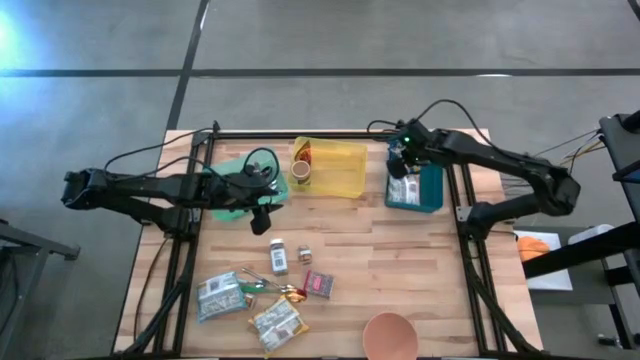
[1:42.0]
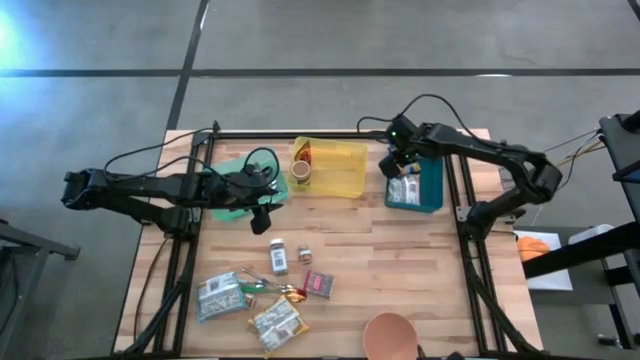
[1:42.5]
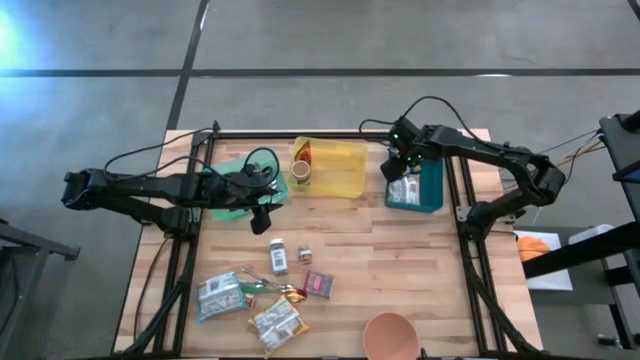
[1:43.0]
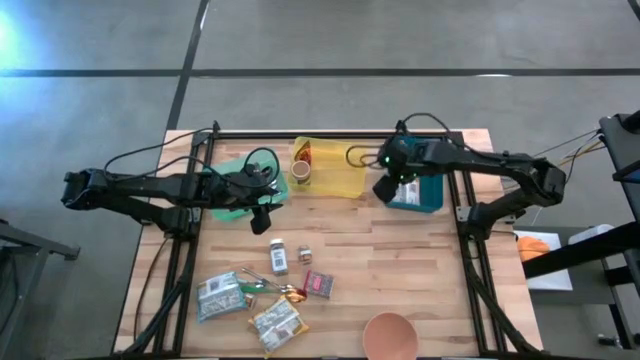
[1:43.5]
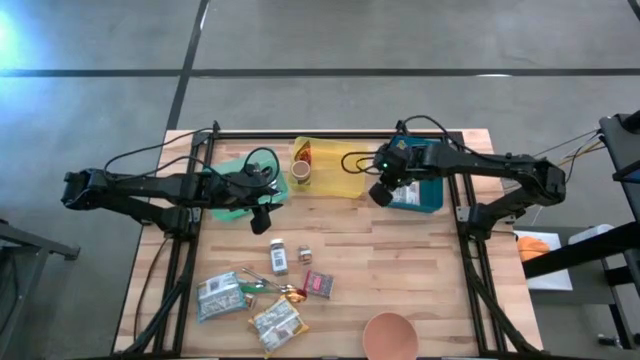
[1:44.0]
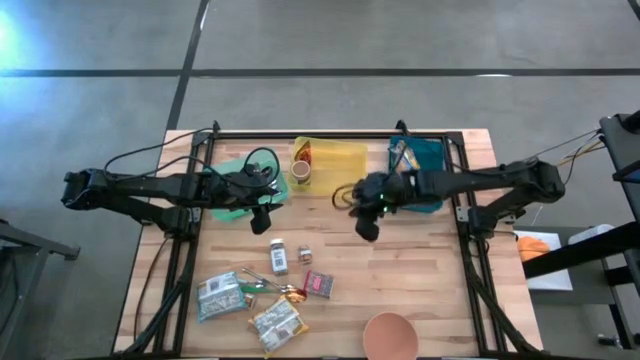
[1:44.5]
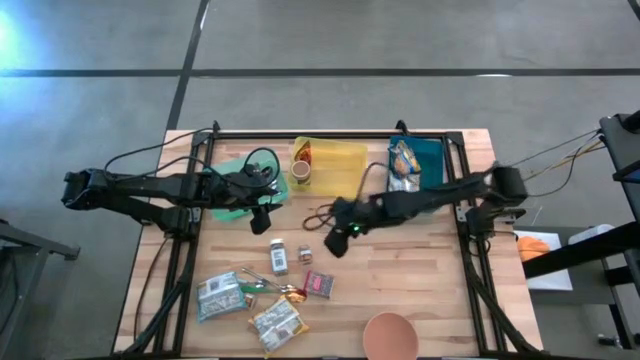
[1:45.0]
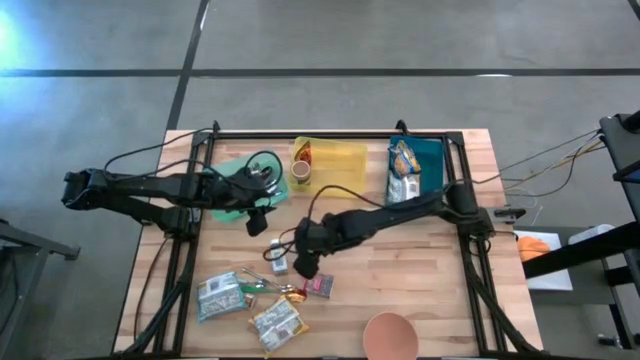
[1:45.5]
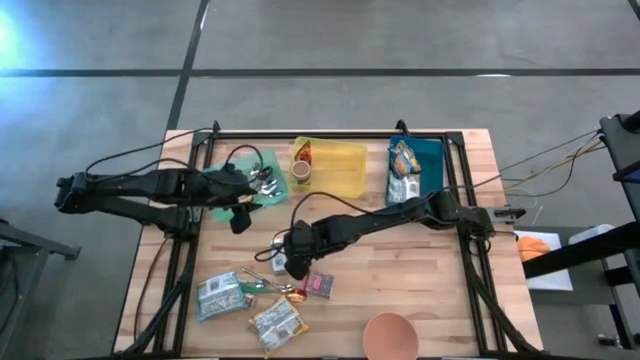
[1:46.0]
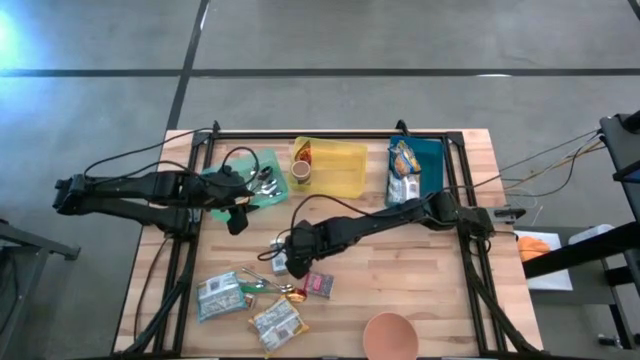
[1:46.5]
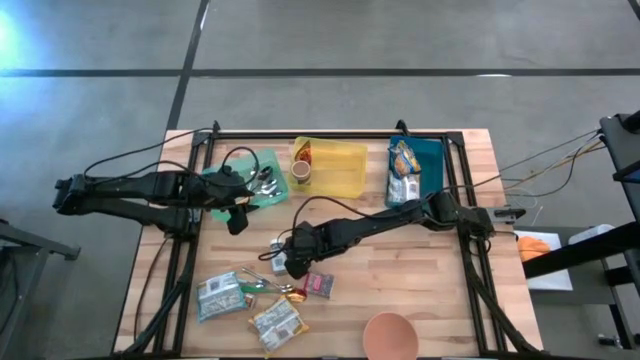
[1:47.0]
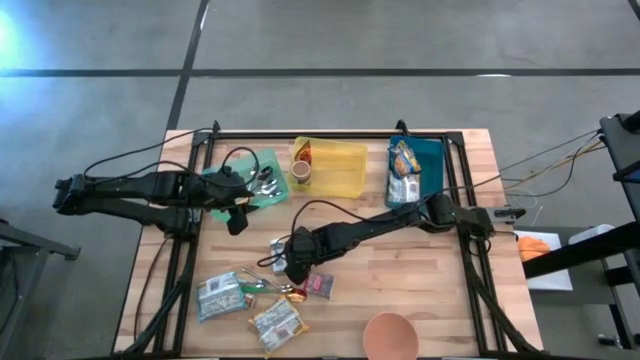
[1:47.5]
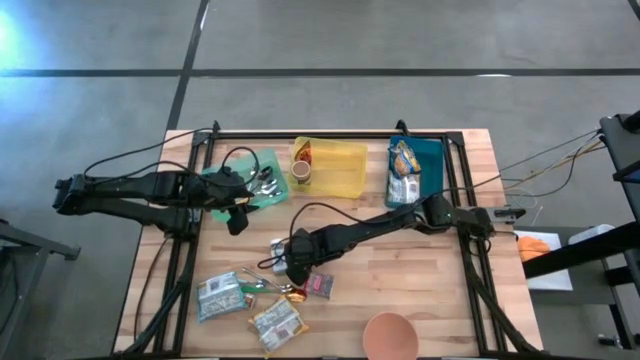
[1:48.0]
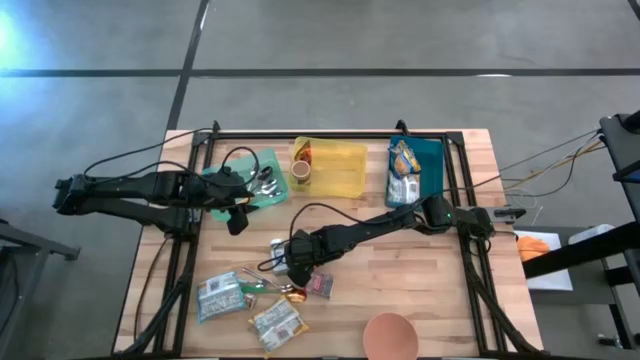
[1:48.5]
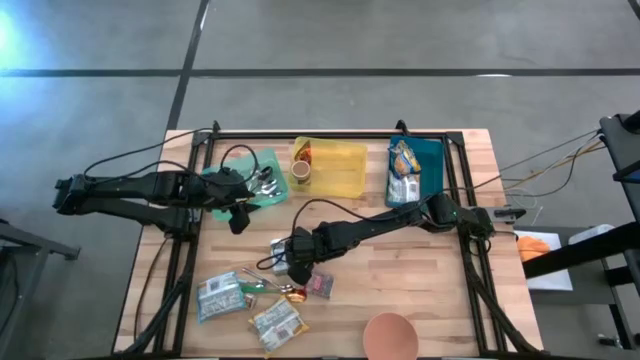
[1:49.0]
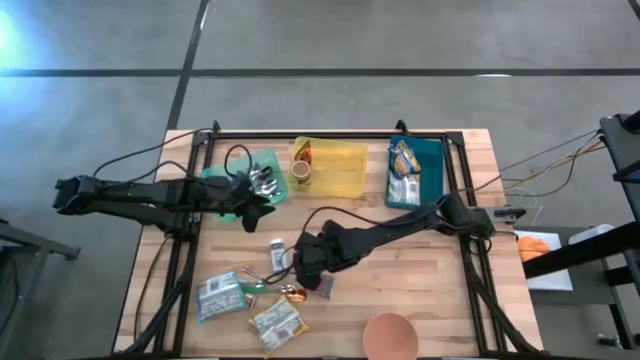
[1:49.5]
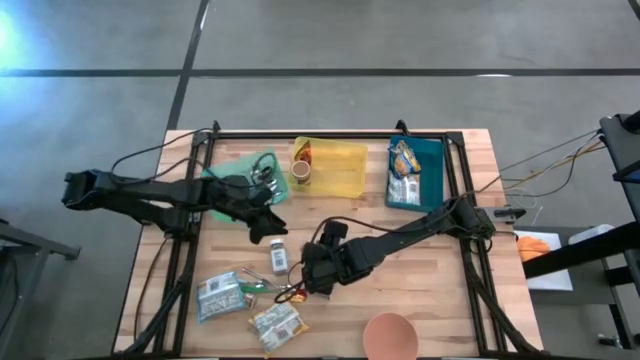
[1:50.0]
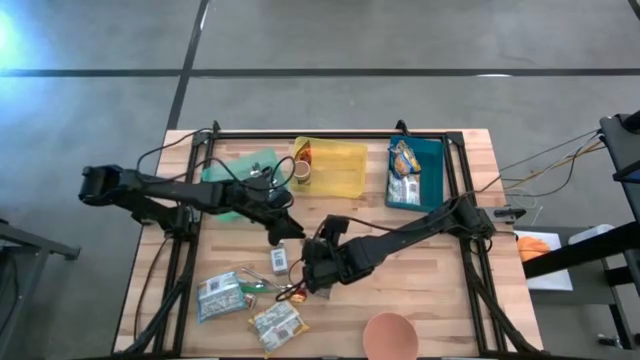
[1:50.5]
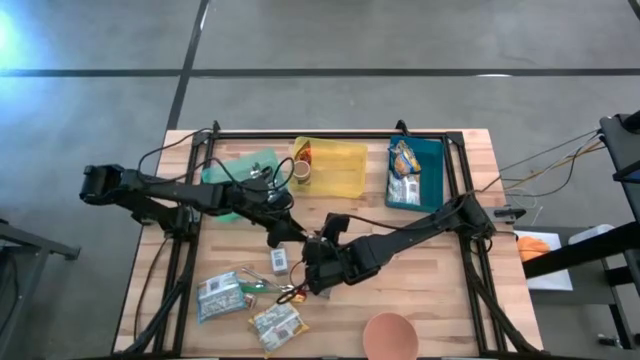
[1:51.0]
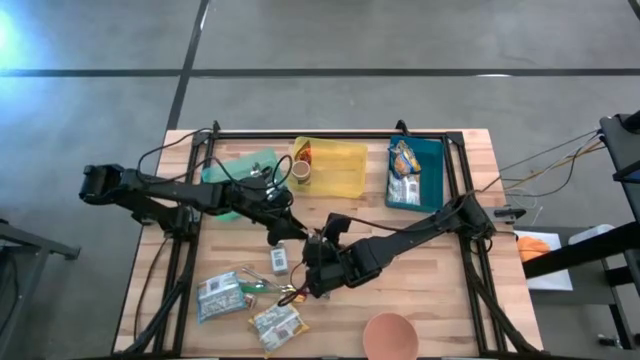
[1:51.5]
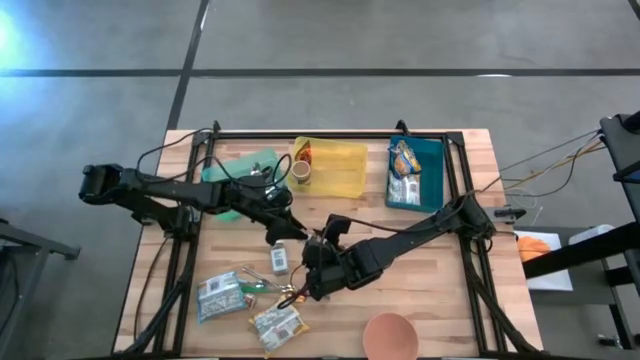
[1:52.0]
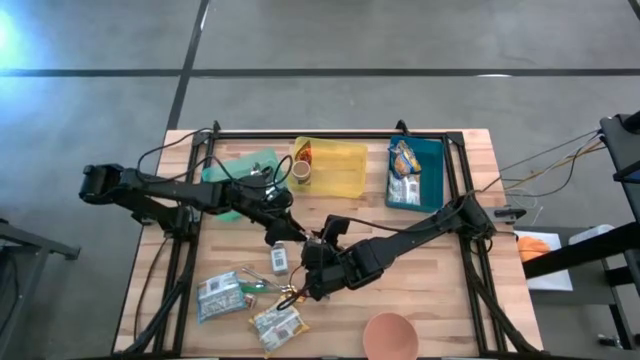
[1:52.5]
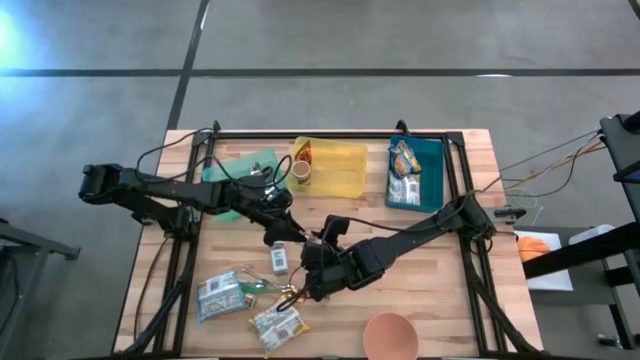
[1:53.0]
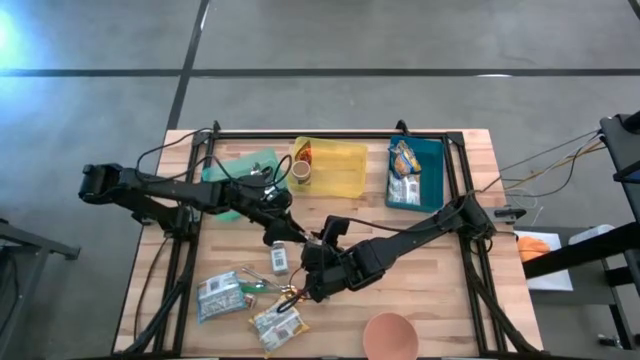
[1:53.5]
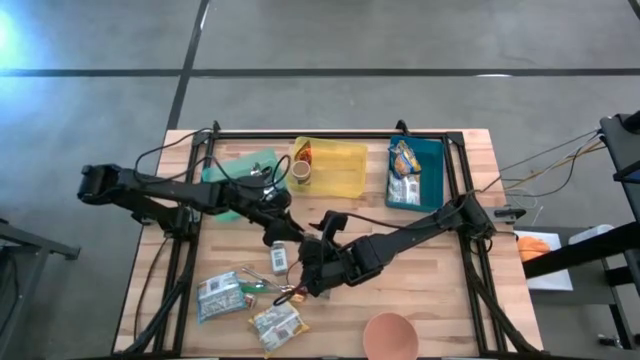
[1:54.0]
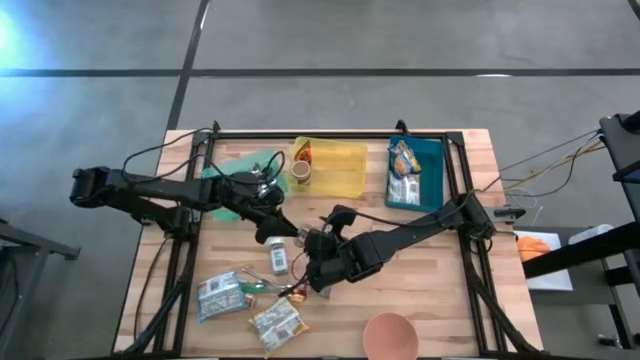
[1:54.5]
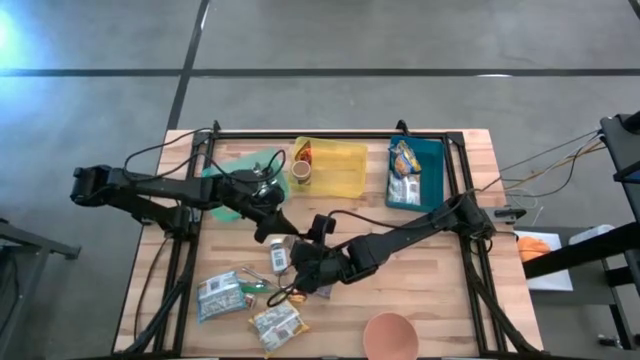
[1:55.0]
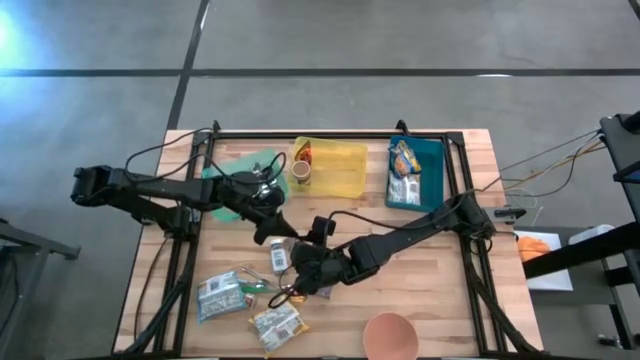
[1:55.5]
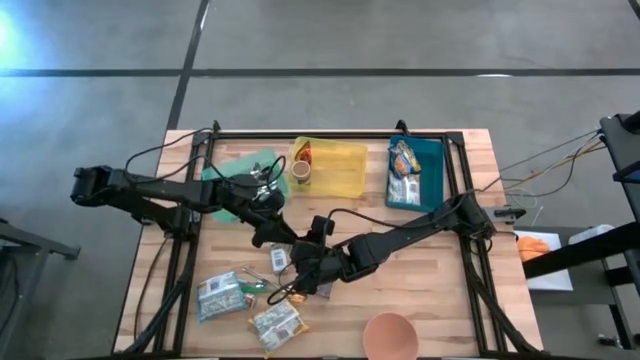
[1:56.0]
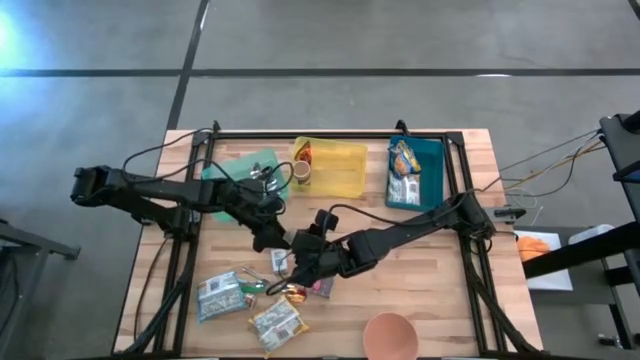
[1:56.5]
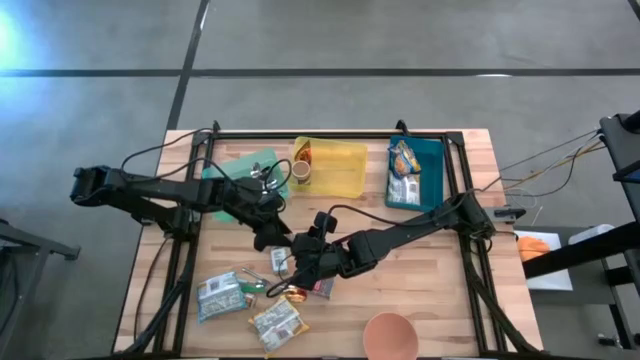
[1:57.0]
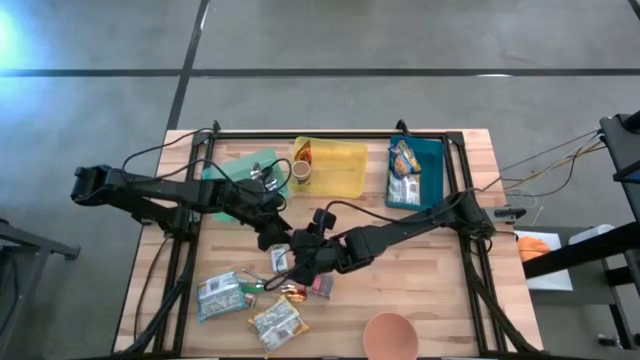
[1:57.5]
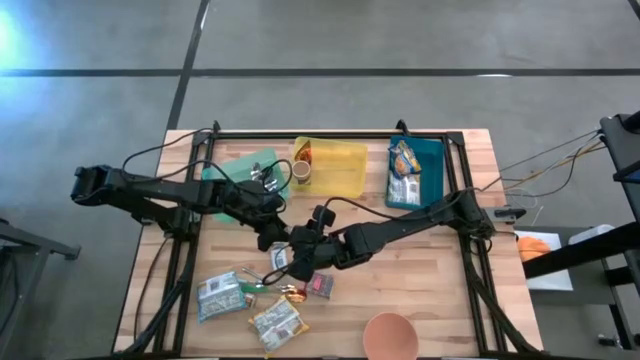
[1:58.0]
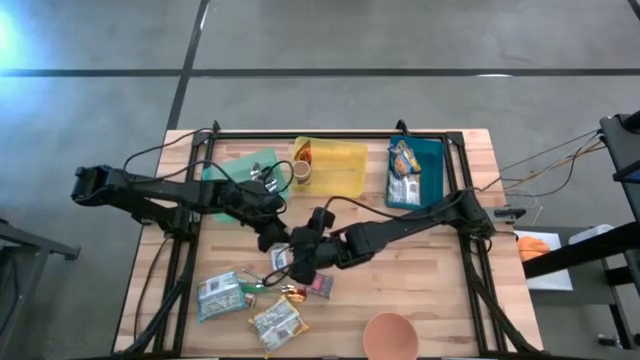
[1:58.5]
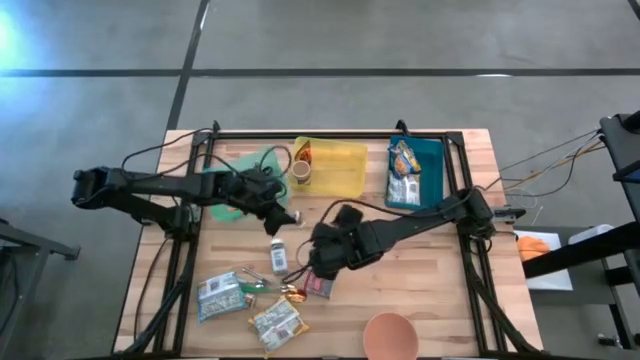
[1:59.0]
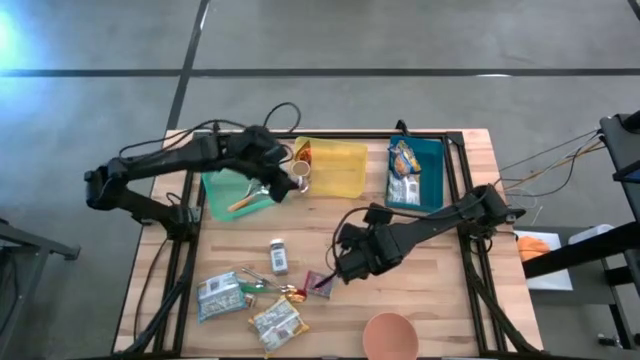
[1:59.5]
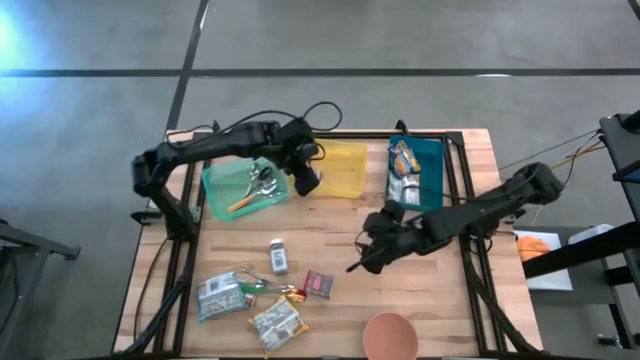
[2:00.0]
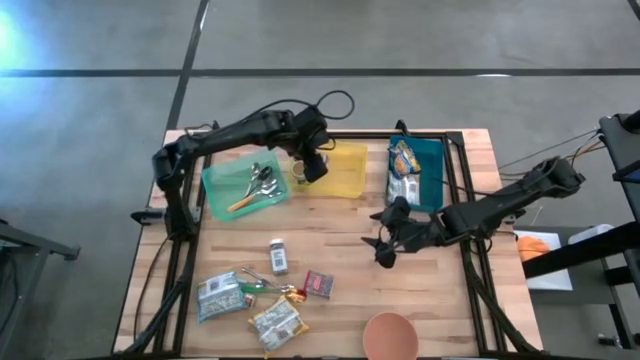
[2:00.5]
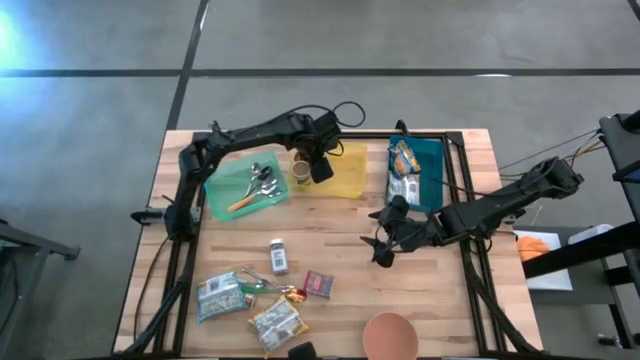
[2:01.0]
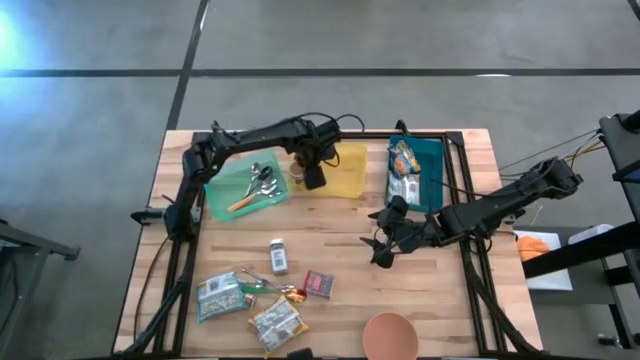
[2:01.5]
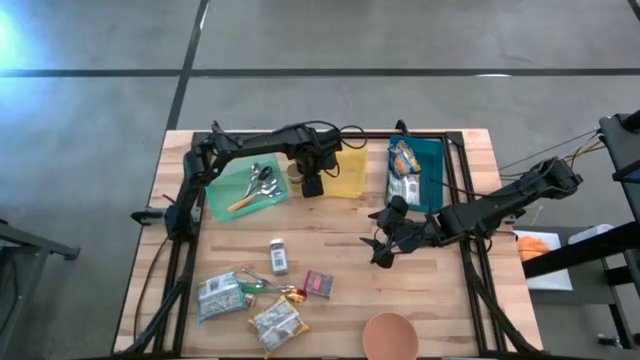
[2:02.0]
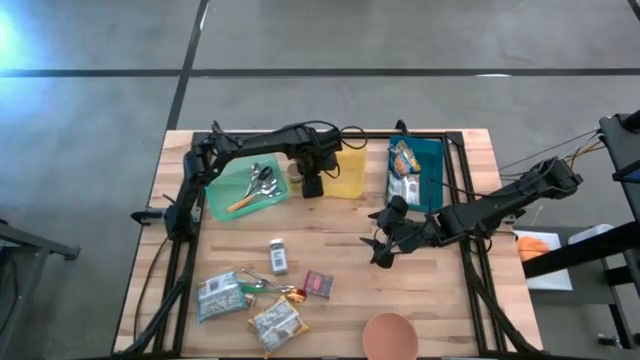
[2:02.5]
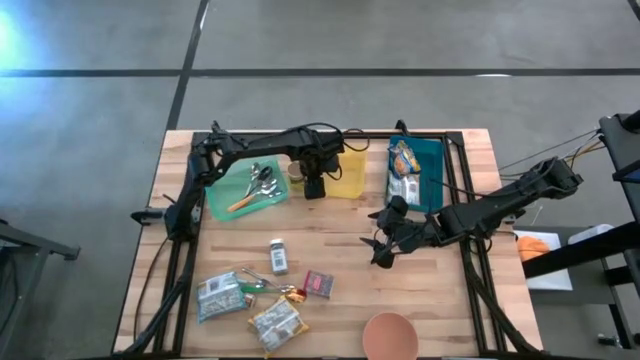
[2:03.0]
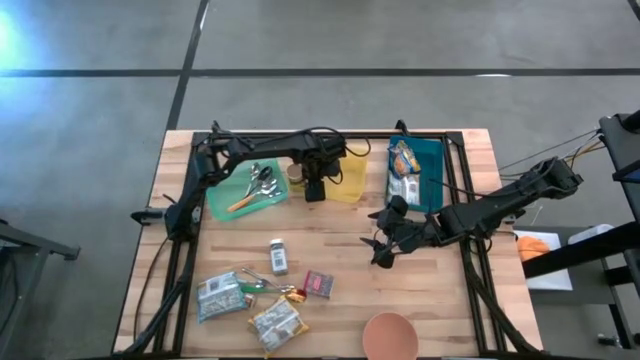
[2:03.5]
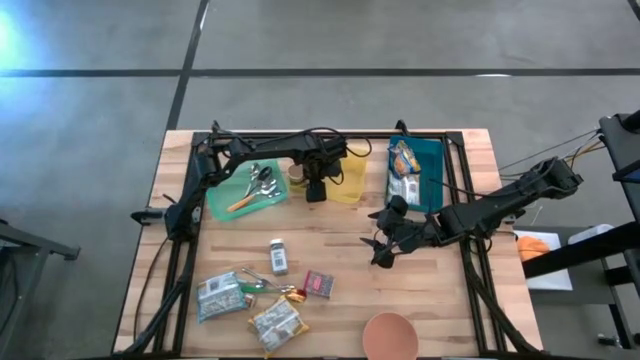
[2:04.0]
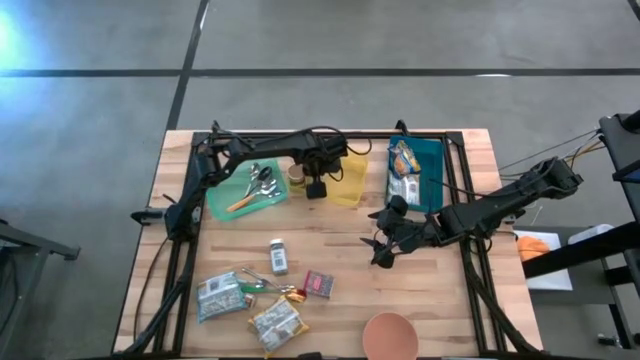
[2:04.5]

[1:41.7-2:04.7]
Put the top brown seasoning bottle into the yellow bin
